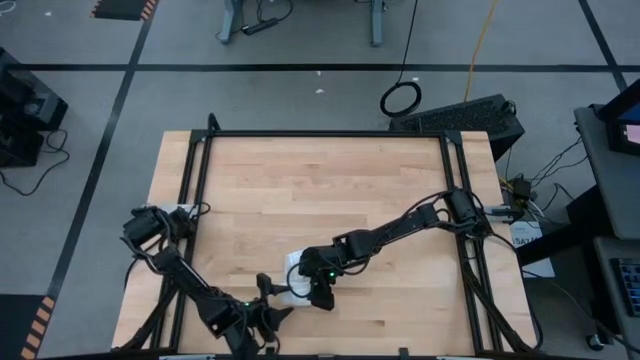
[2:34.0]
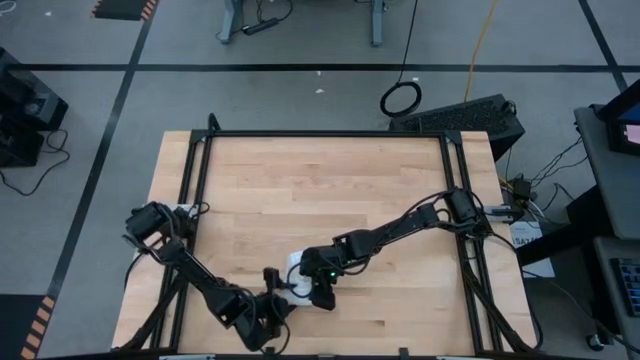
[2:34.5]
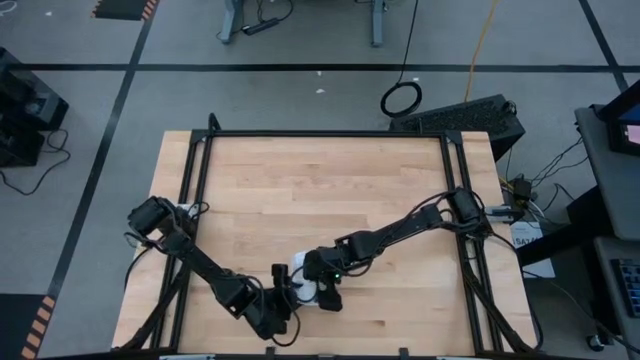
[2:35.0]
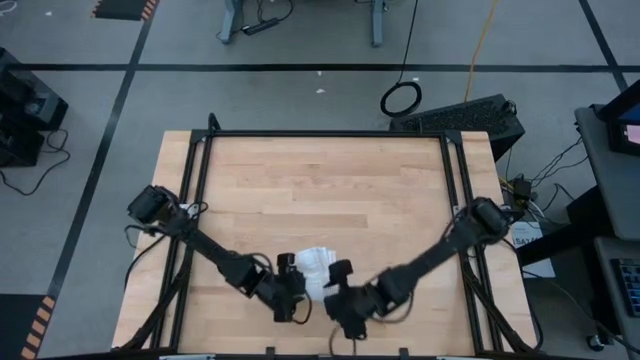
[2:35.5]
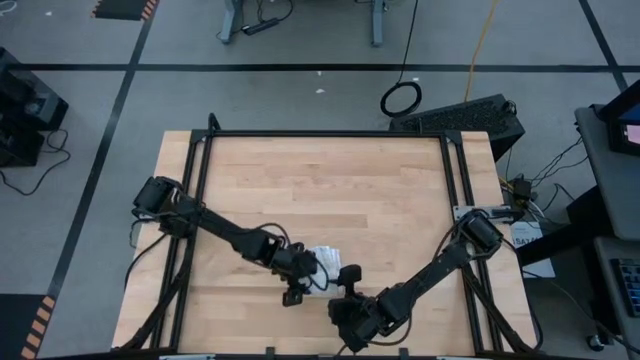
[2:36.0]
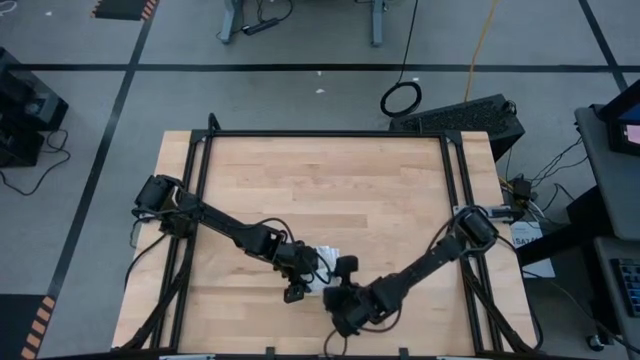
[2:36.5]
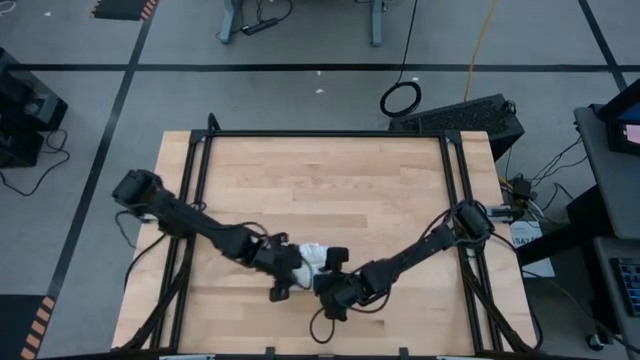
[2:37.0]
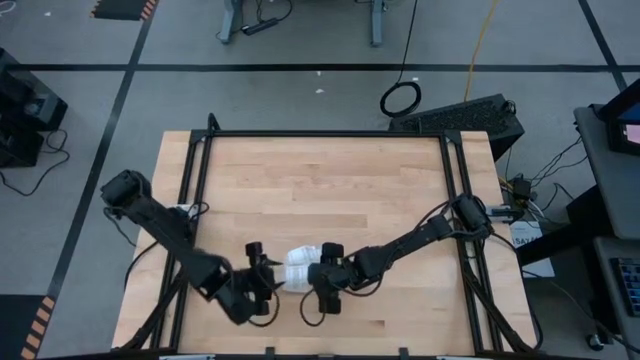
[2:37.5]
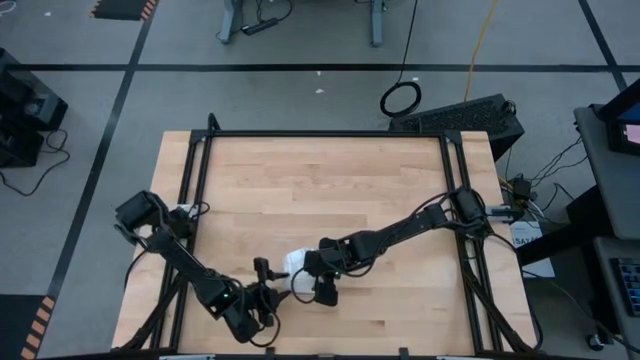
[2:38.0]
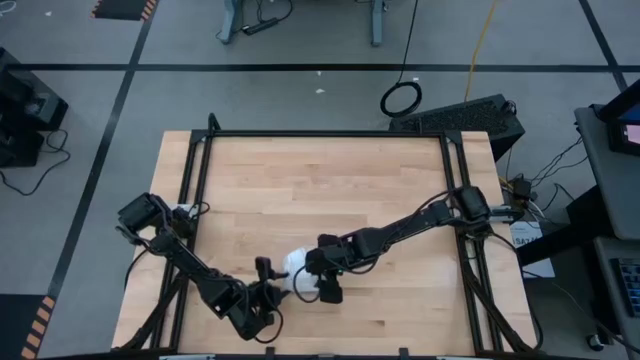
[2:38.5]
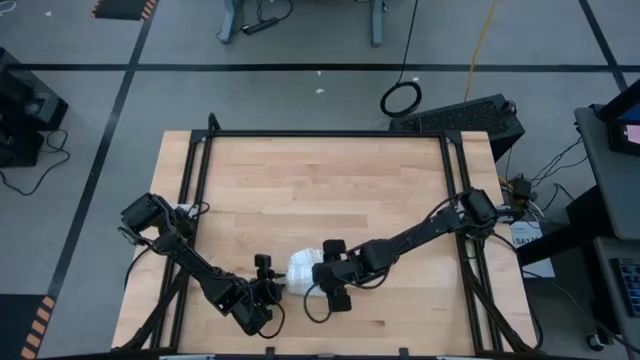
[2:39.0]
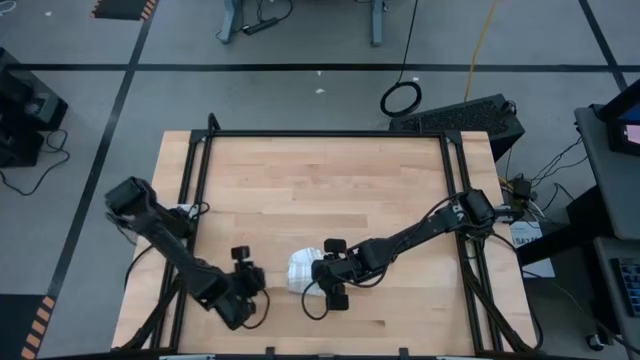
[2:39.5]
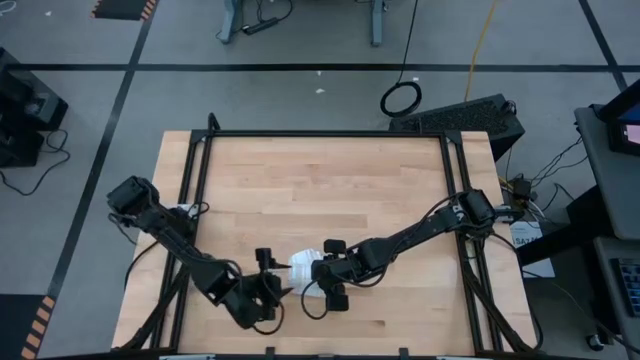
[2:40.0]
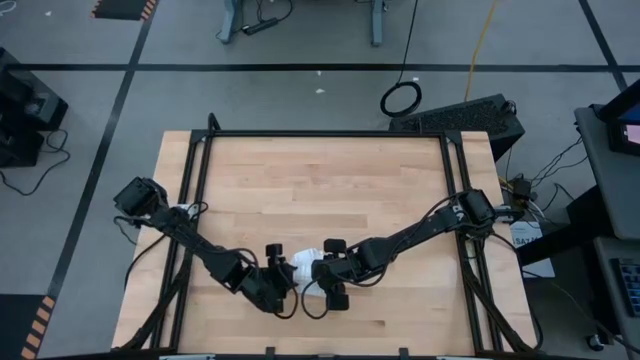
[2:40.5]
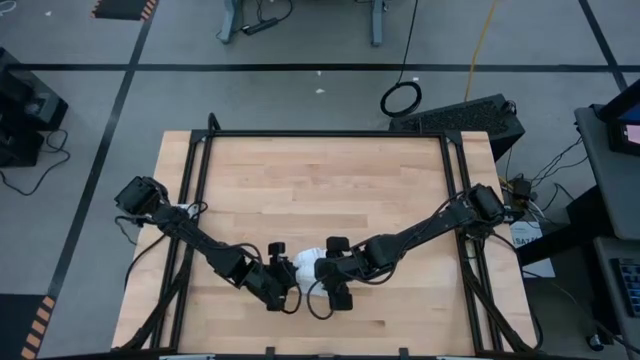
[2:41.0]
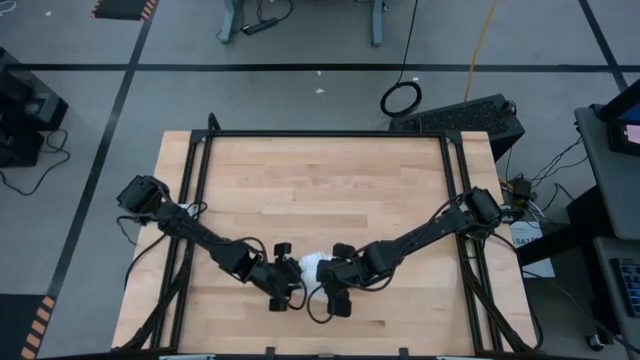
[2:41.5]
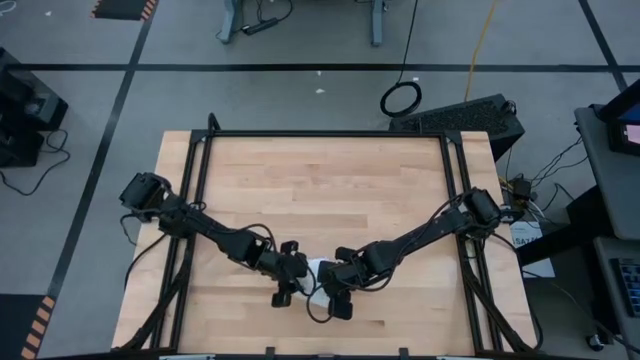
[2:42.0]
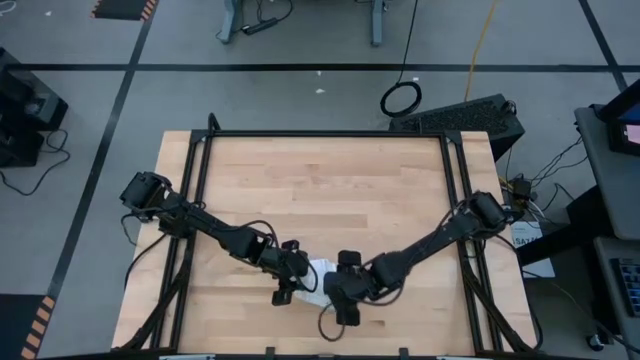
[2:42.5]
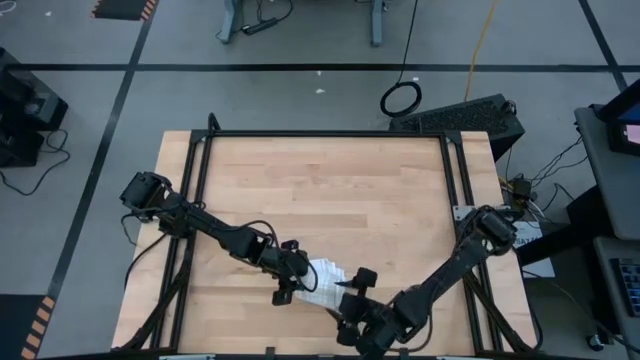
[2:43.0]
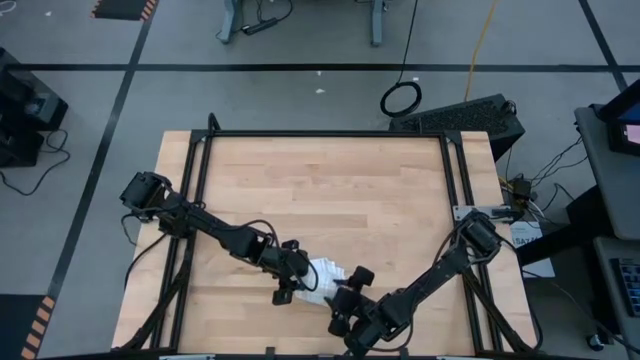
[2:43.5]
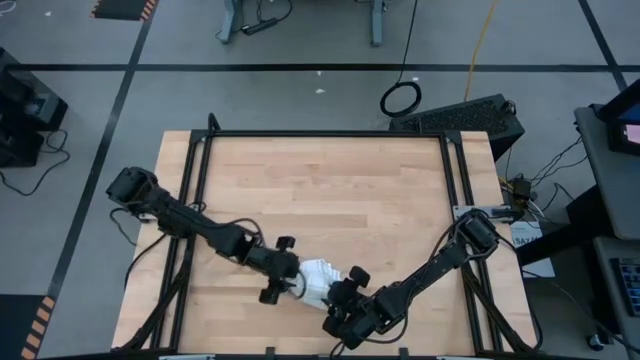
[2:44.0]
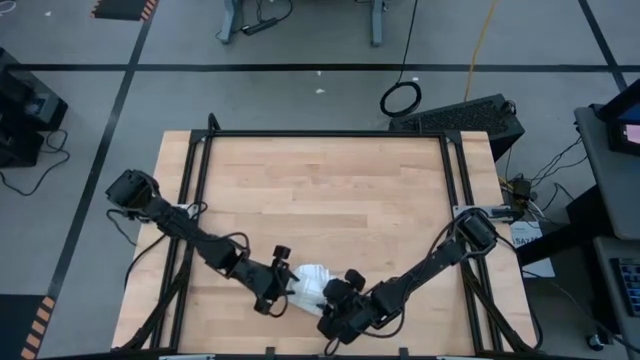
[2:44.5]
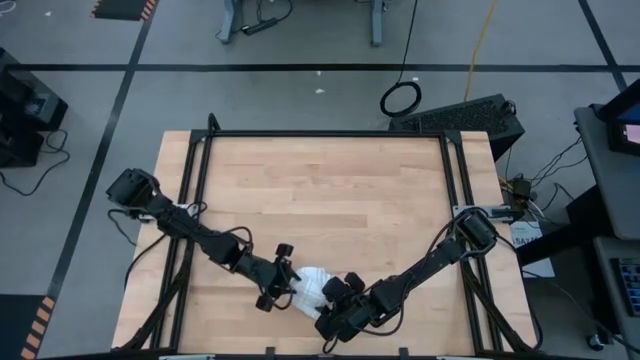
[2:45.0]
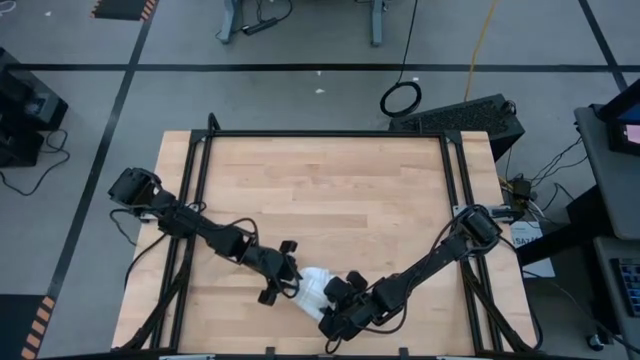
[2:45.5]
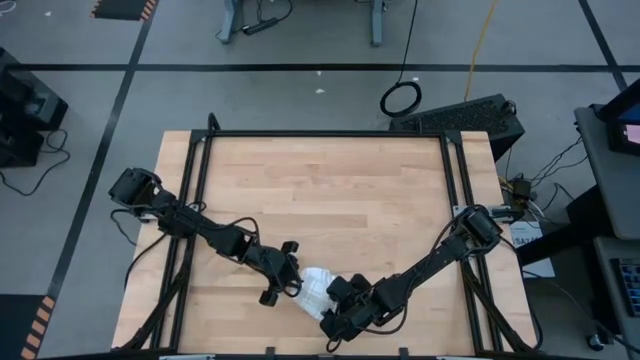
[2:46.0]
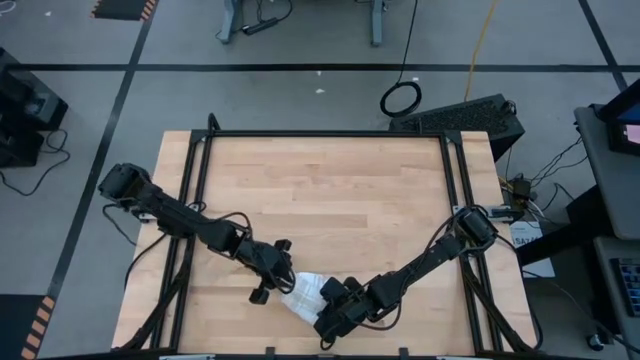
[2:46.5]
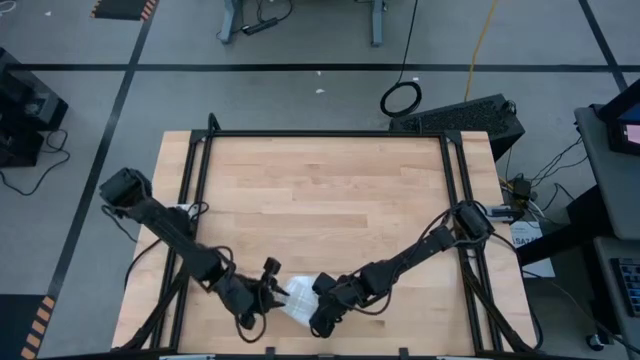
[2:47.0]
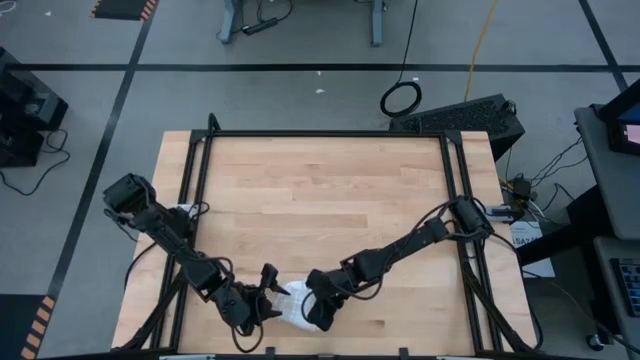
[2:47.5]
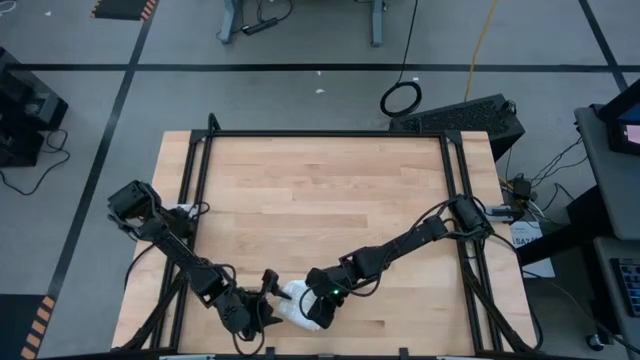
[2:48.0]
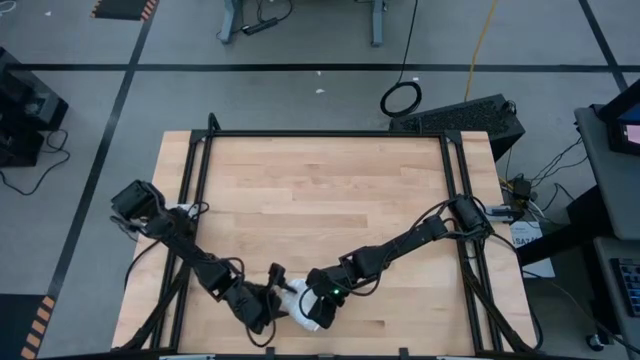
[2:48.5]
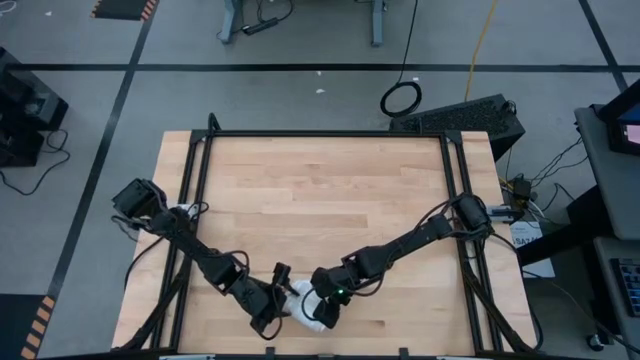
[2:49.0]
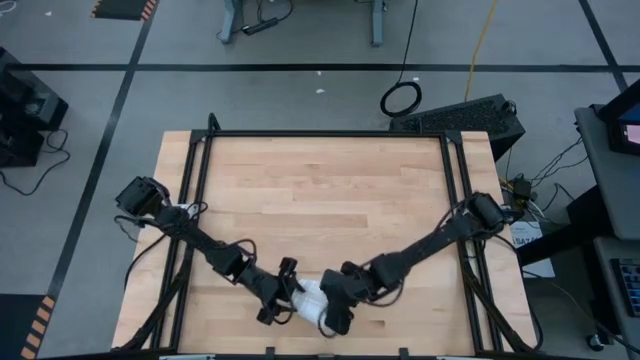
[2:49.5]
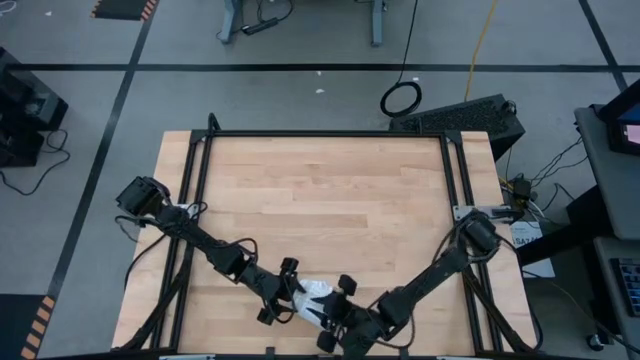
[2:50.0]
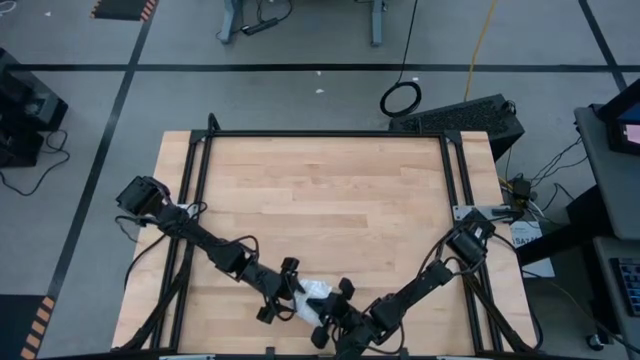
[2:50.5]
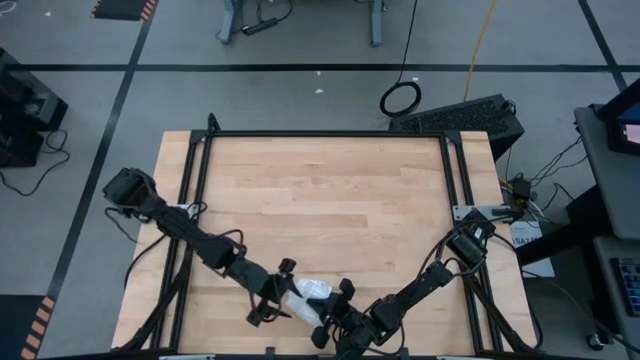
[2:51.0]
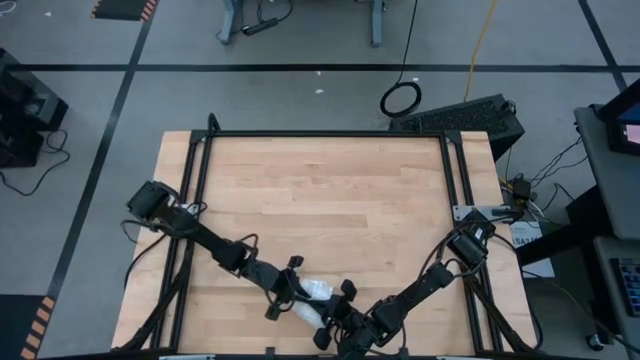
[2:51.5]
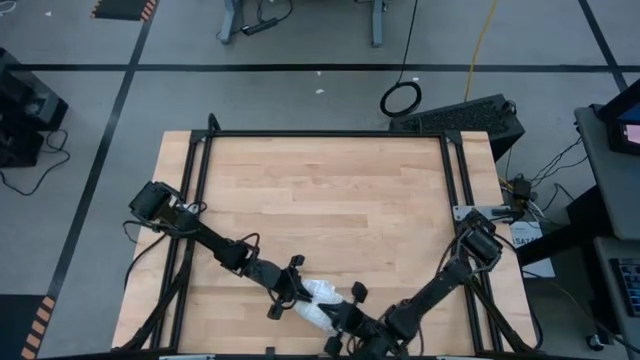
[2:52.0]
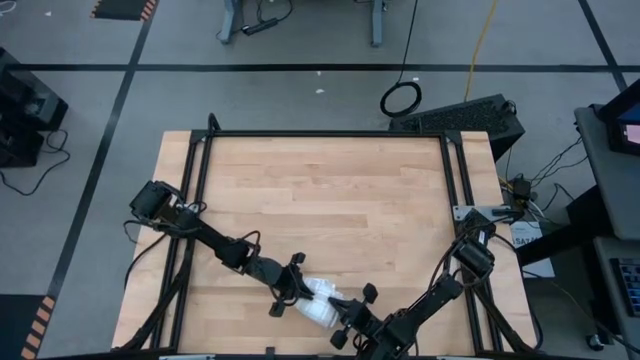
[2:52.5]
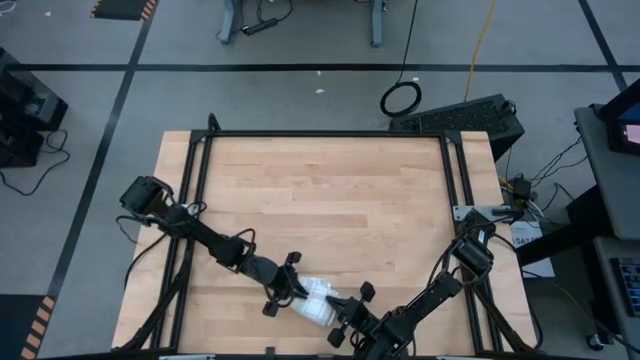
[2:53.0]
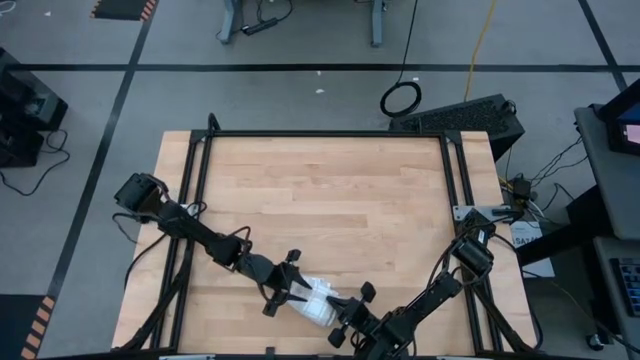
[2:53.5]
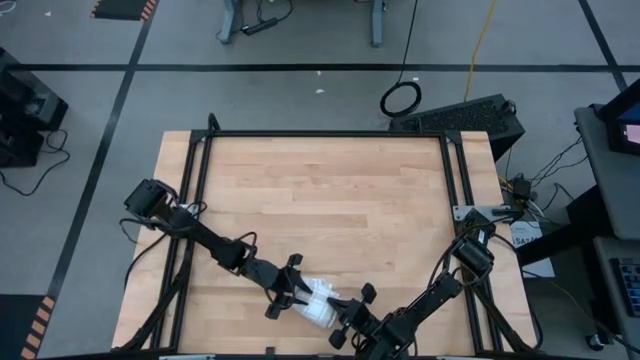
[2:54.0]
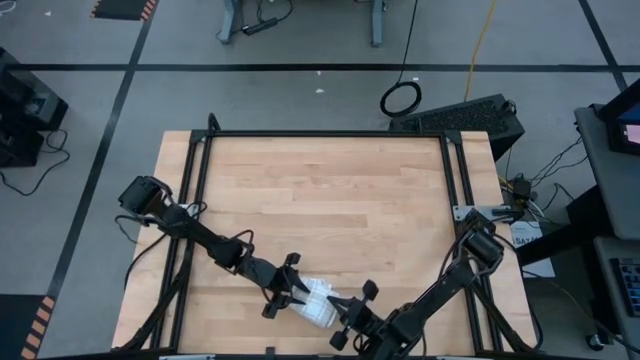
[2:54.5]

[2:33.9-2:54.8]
Task: Roll towel
Roll the brown checkered towel

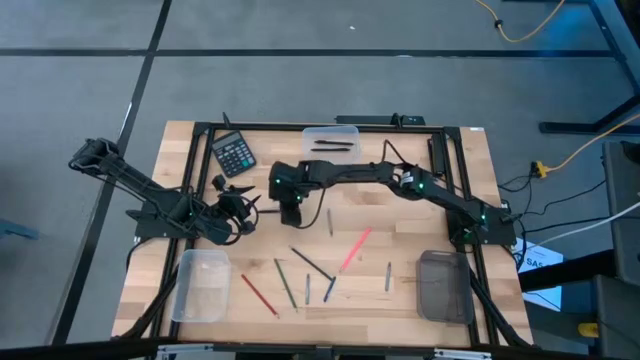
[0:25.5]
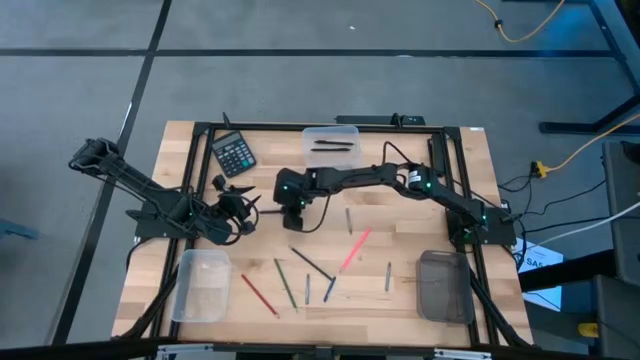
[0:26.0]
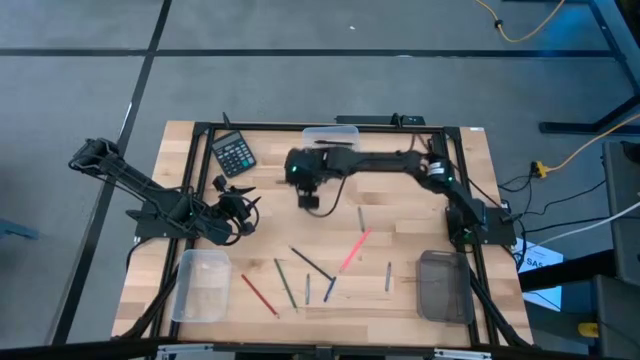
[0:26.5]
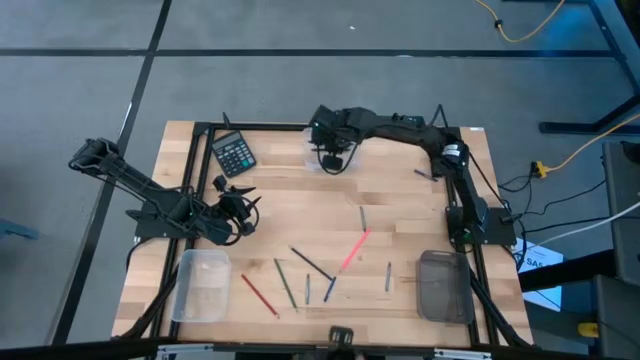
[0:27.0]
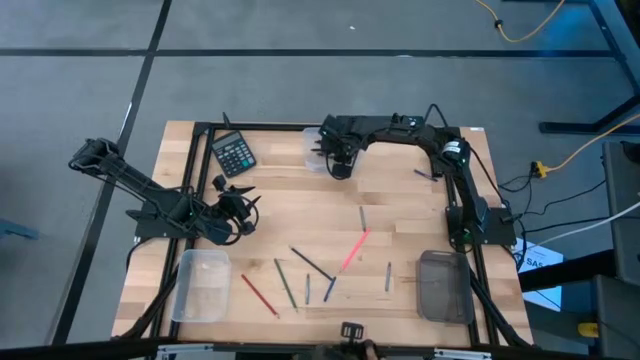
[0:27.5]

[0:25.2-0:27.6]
Task: Sort crayons/erasers/pens/pencils in bins
Put the black pen into the top transparent bin
